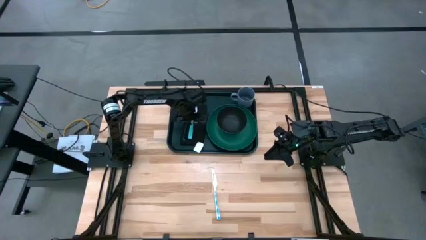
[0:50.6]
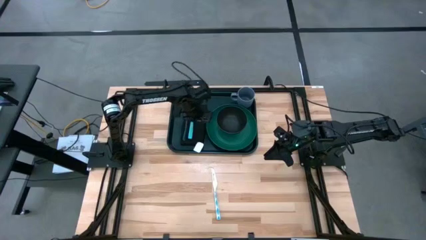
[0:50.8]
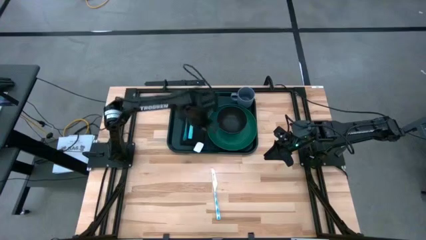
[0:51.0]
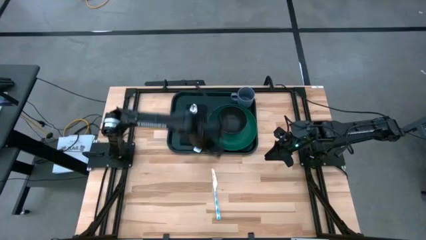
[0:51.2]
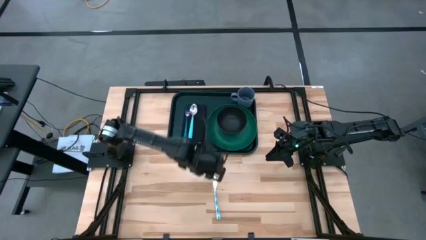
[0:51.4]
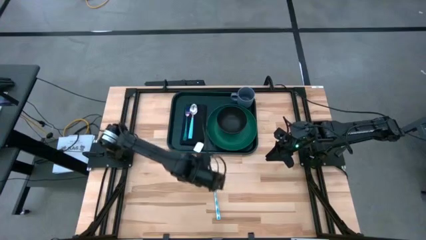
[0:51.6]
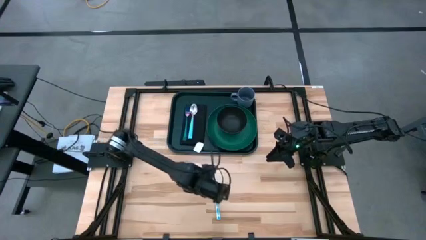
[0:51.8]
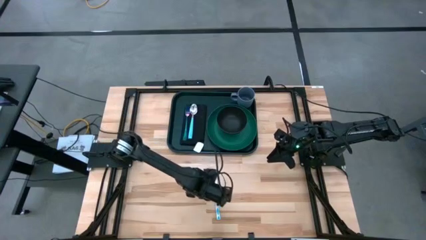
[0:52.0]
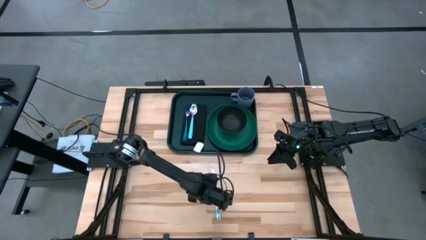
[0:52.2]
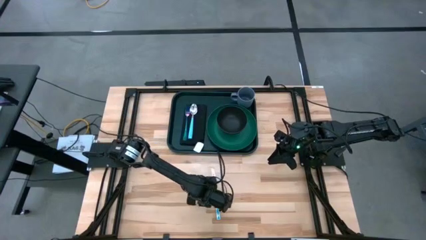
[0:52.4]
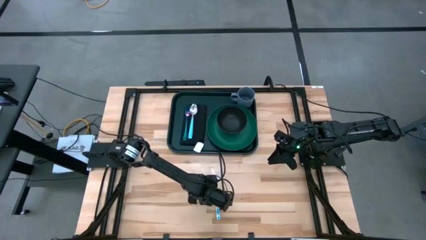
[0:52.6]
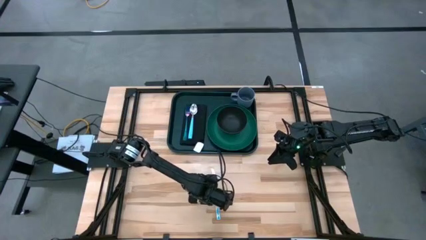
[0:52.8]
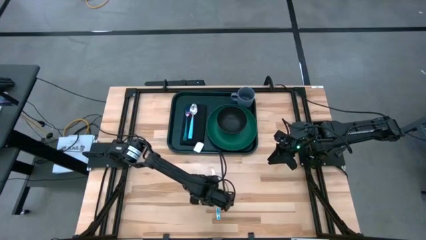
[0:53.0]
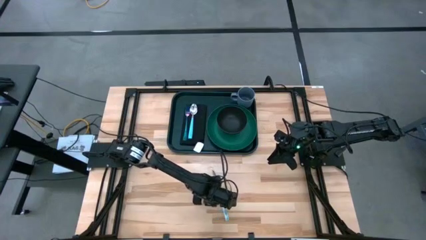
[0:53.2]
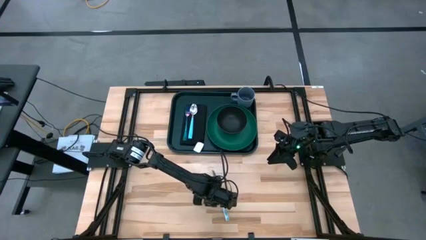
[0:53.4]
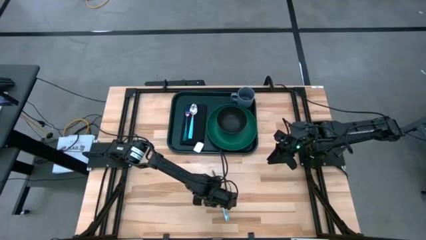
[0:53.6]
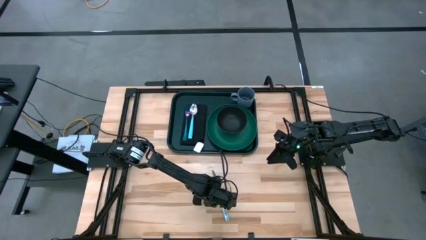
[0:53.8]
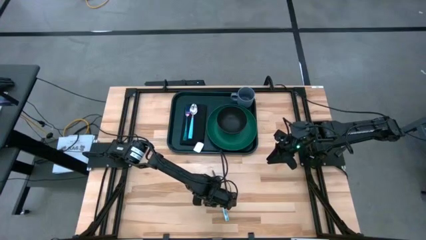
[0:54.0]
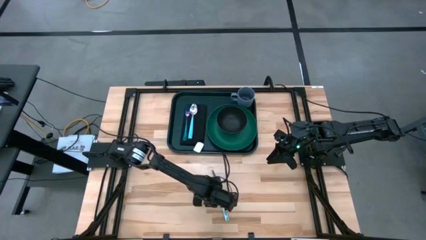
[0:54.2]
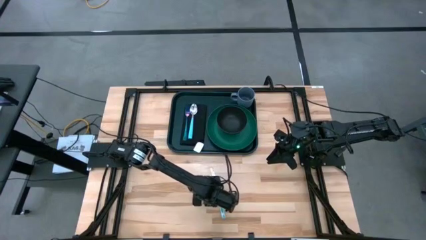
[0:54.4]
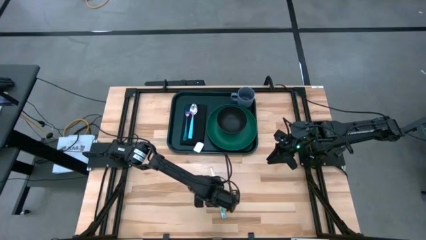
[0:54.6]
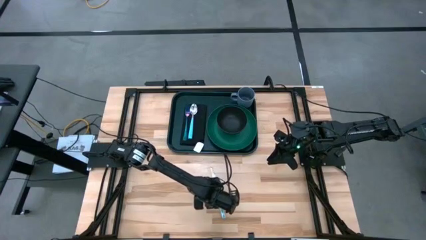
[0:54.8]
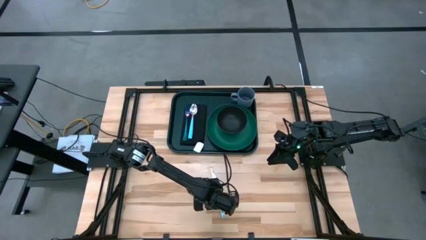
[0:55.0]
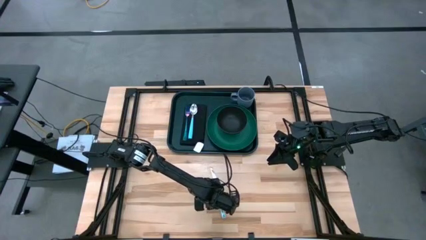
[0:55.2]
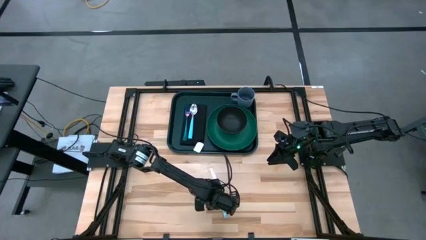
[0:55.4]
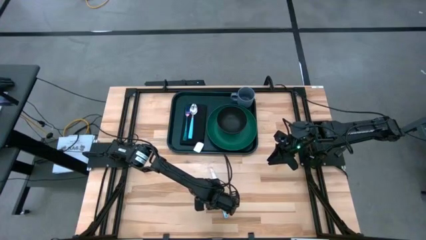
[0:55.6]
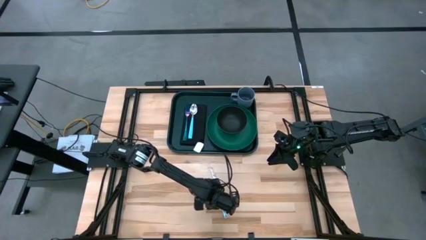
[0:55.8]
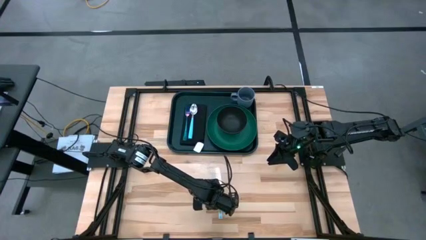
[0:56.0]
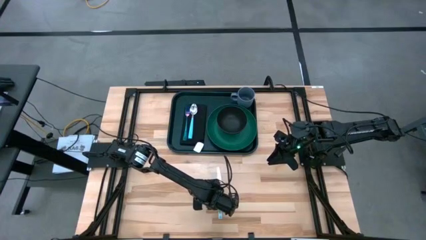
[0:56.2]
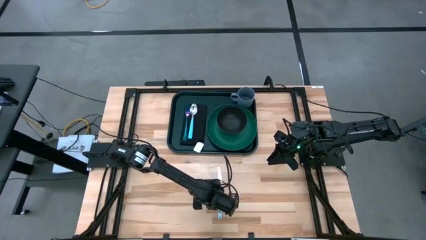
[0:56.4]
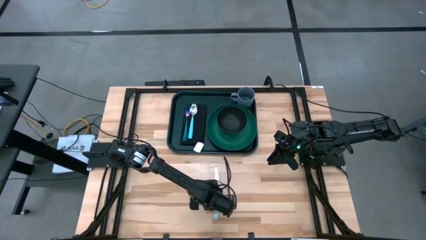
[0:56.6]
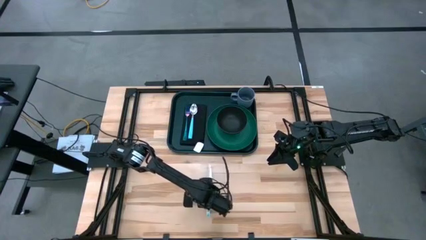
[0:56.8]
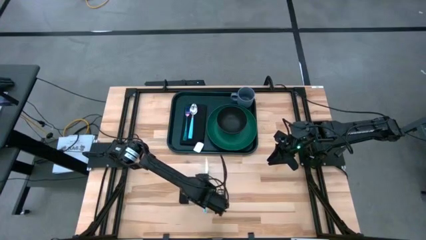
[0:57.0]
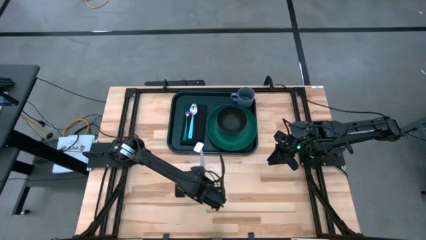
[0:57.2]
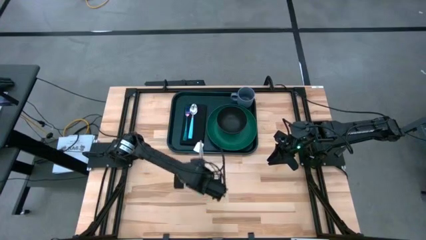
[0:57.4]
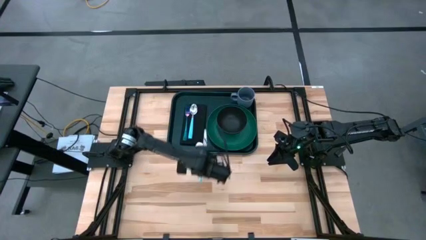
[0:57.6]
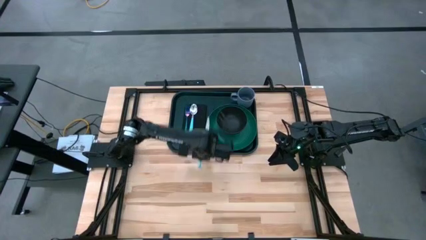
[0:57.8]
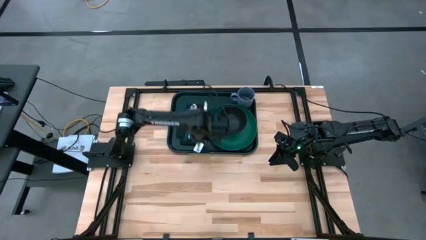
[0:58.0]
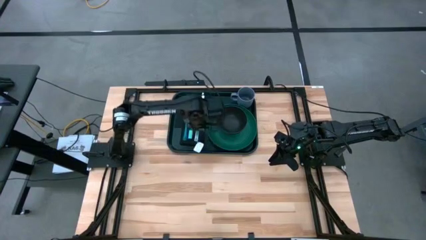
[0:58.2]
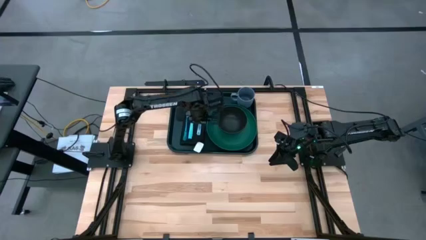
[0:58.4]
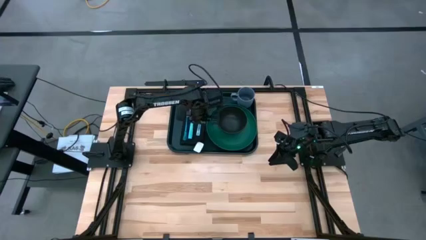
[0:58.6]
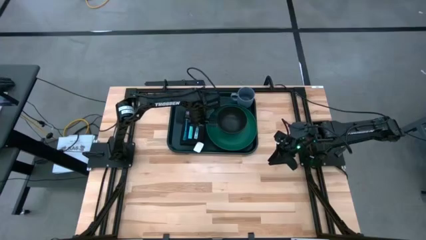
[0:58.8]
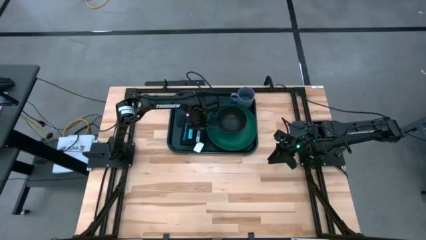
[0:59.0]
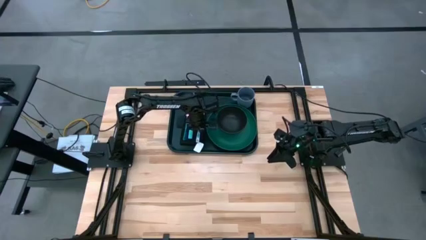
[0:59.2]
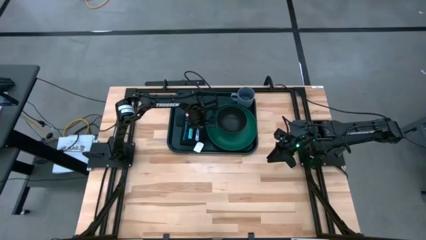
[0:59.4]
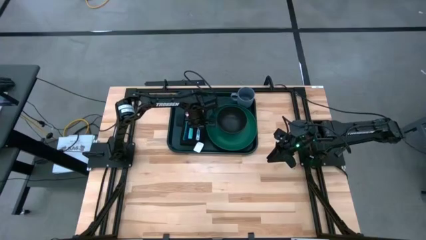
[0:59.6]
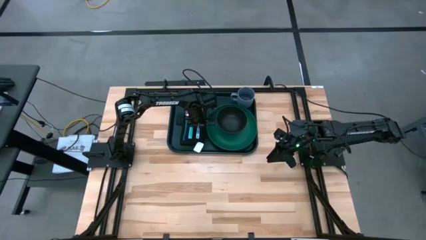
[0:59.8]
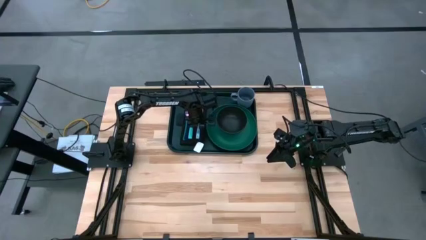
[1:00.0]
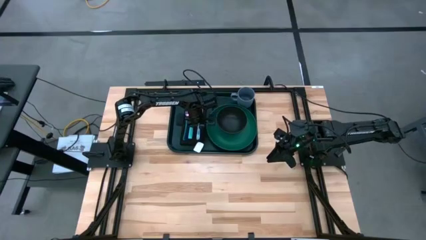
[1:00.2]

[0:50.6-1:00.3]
Task: Set up tray
Put the knife on the black table napkin to the right of the spoon
